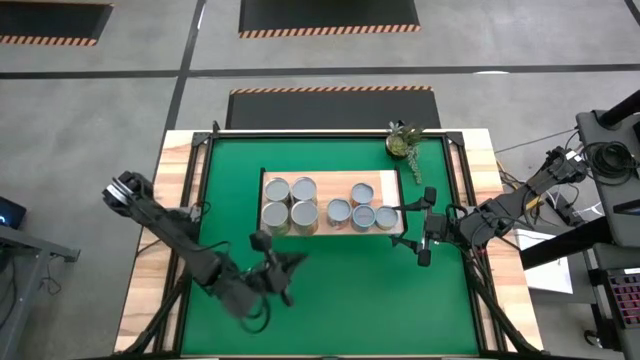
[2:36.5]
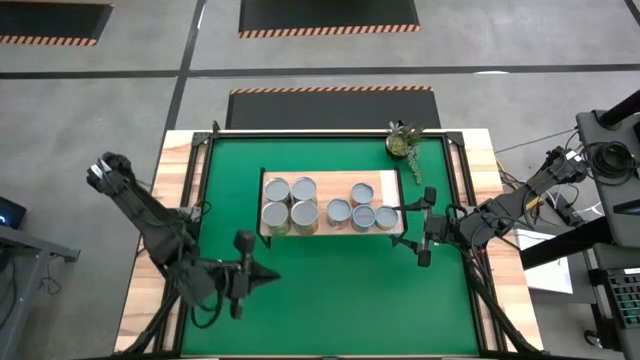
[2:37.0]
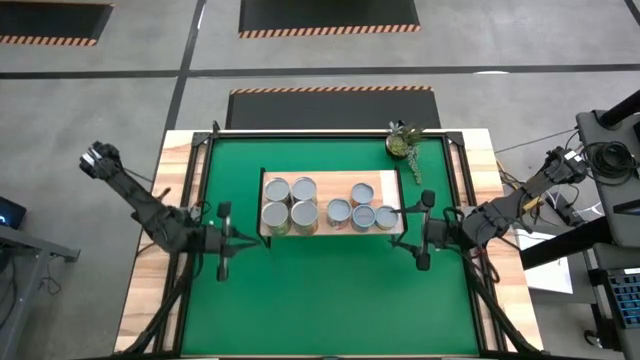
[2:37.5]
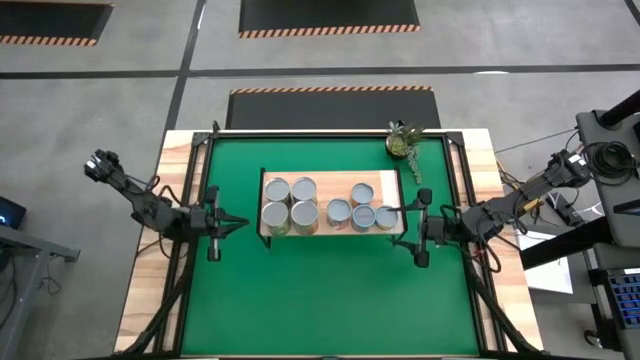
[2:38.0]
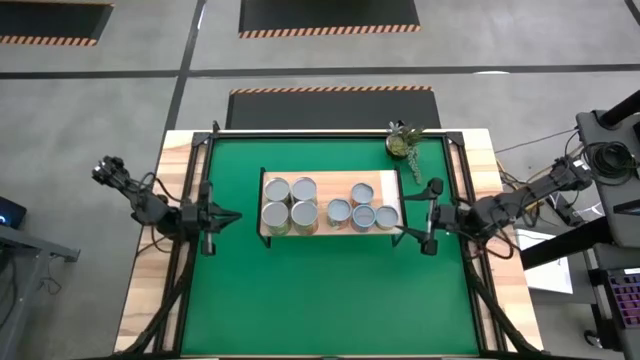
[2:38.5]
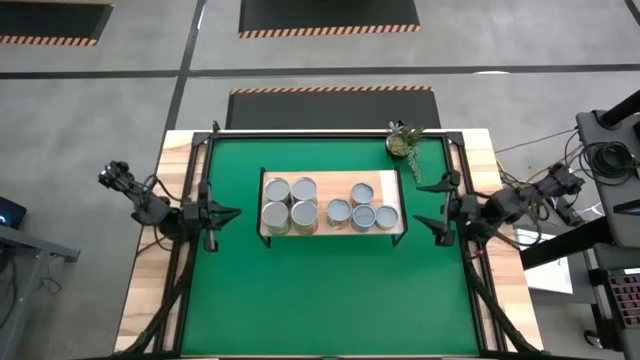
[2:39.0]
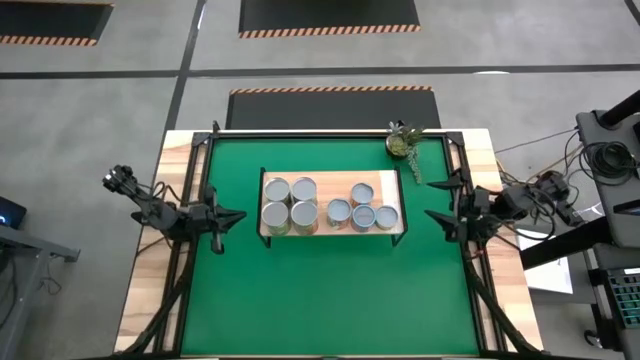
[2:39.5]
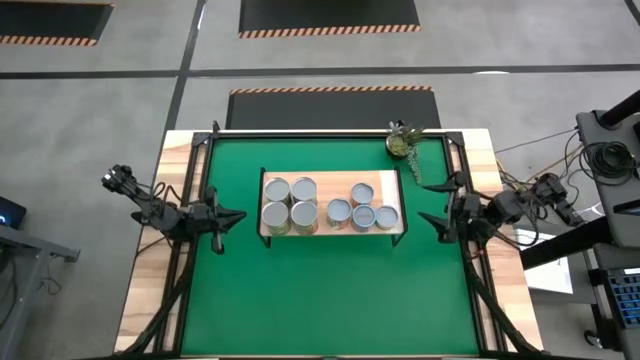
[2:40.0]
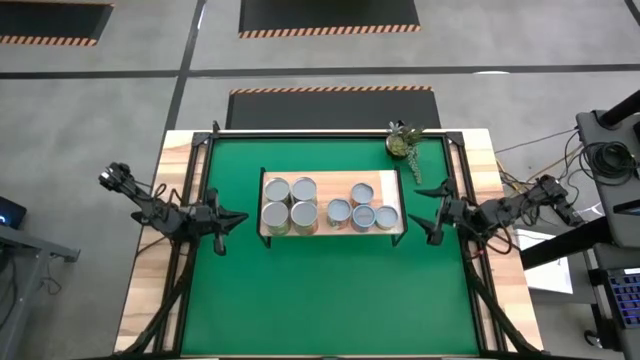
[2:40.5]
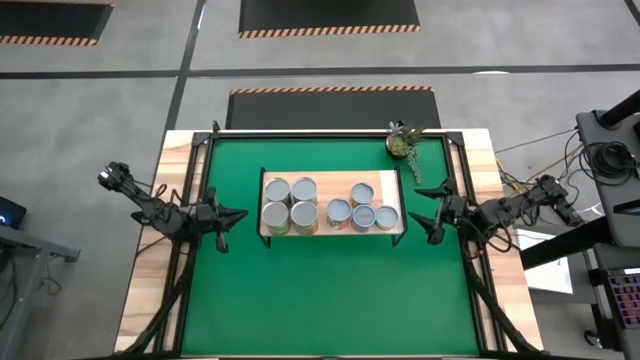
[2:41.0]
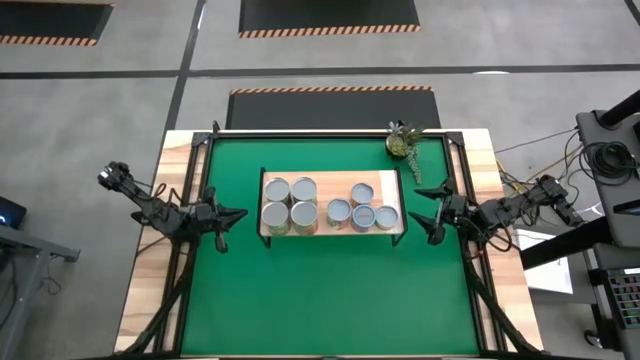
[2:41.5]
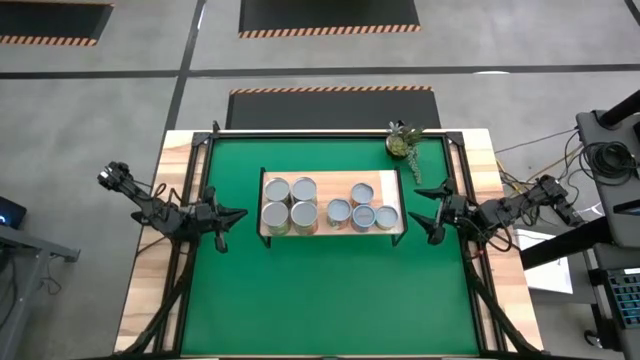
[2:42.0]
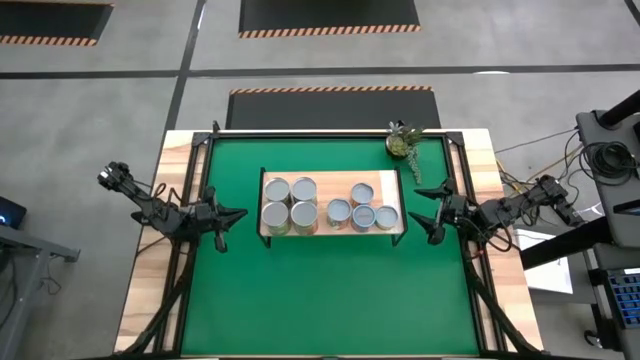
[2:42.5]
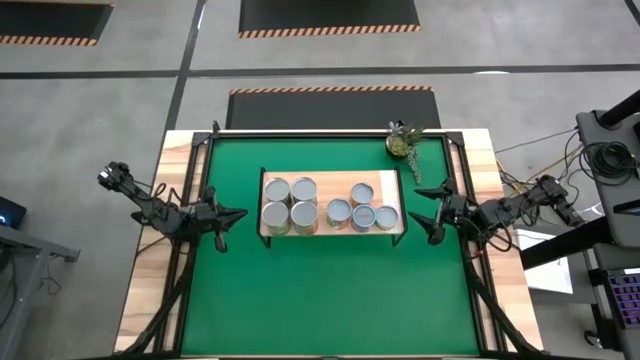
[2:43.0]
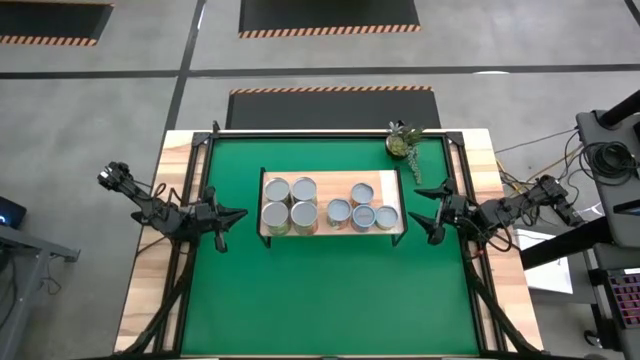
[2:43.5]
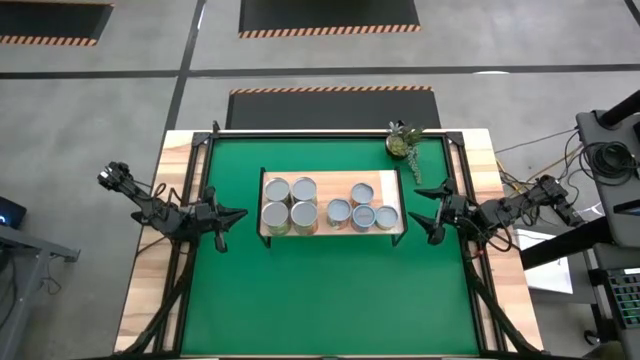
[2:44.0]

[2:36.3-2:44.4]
Task: Pick and place cans onto a shelf
Return to Home Position

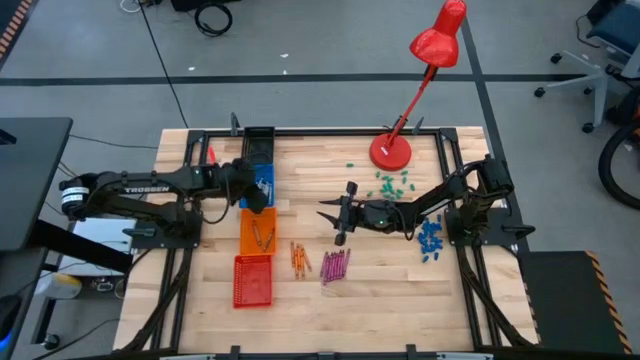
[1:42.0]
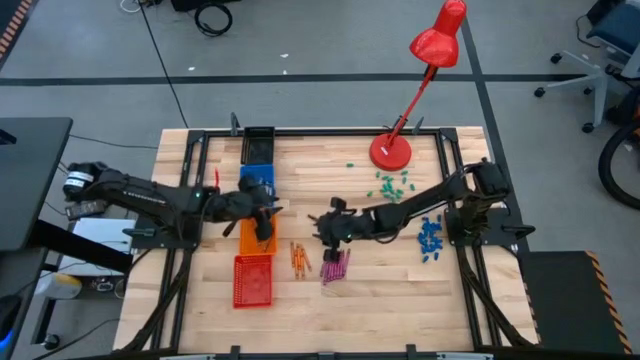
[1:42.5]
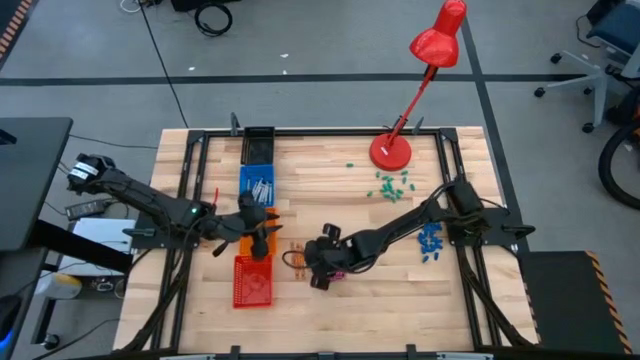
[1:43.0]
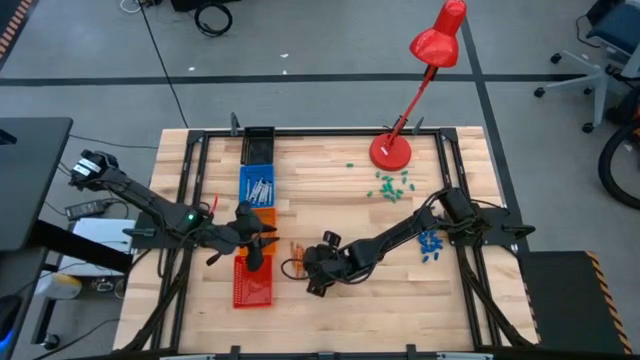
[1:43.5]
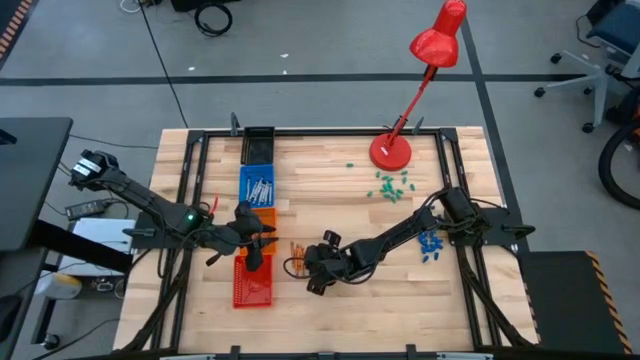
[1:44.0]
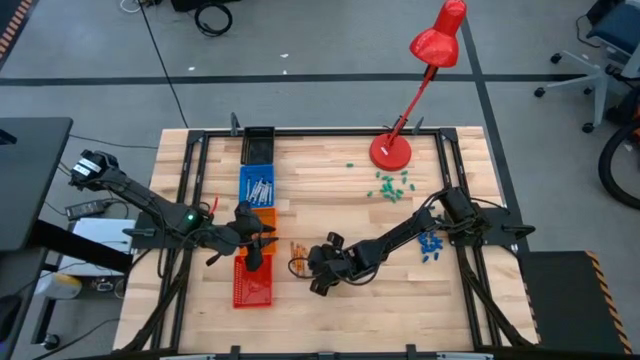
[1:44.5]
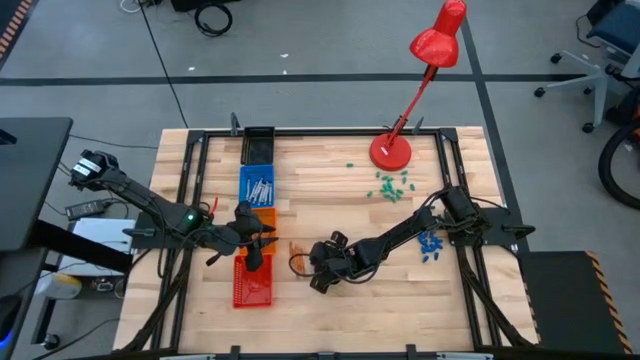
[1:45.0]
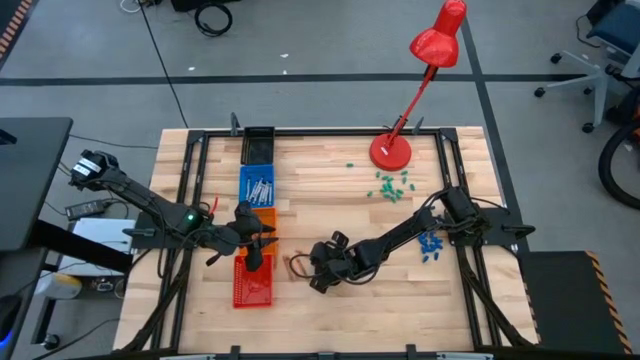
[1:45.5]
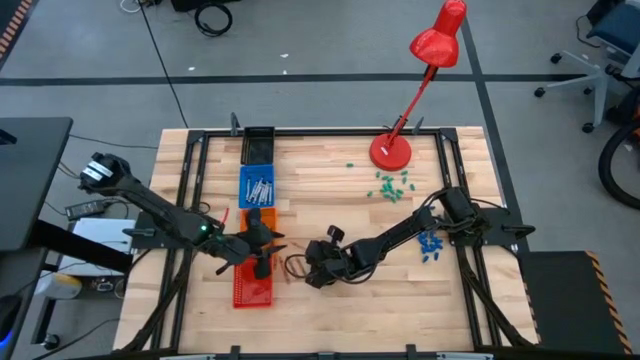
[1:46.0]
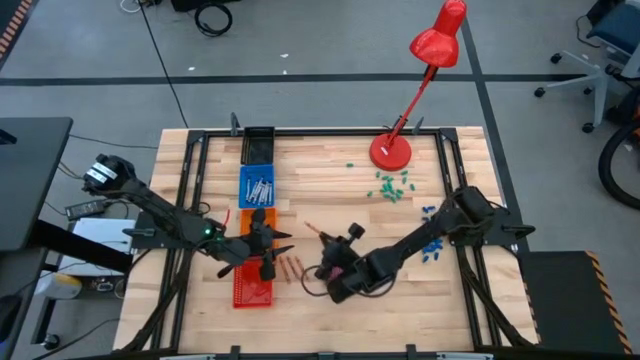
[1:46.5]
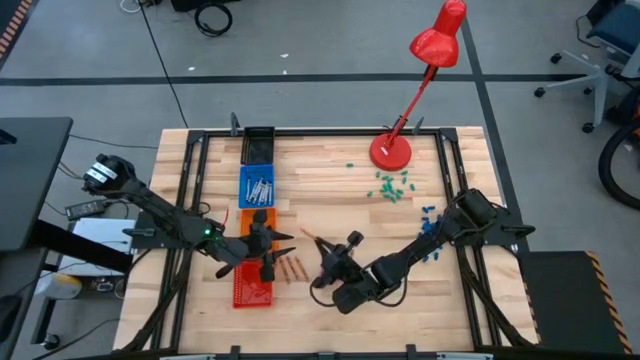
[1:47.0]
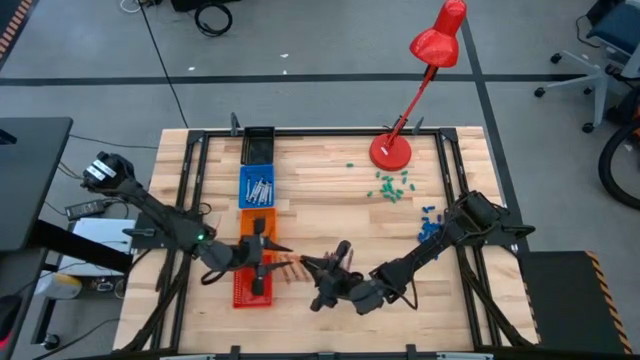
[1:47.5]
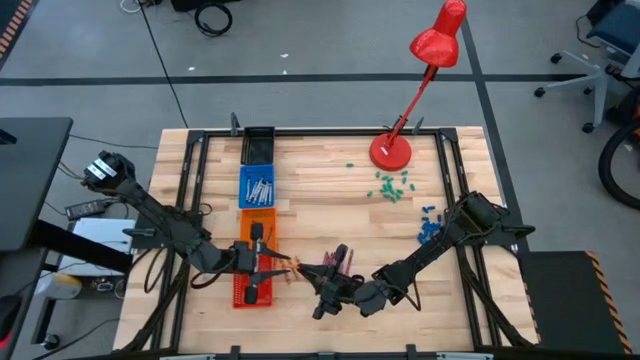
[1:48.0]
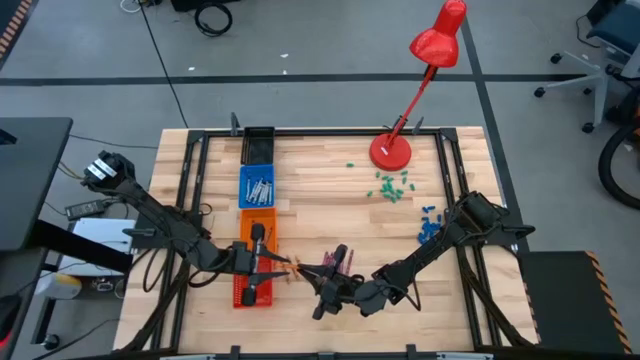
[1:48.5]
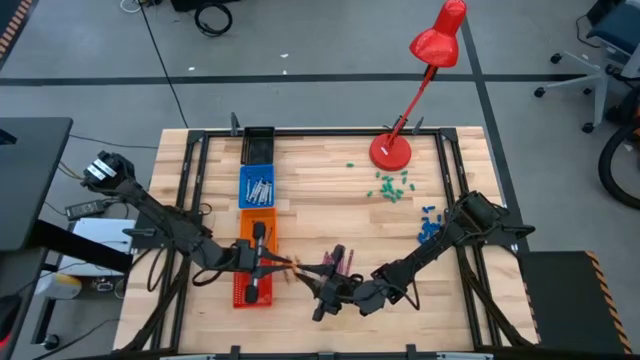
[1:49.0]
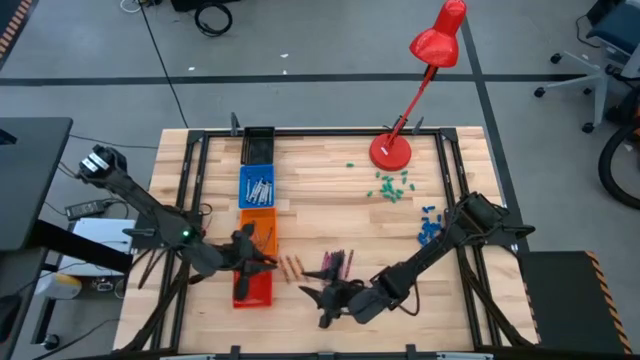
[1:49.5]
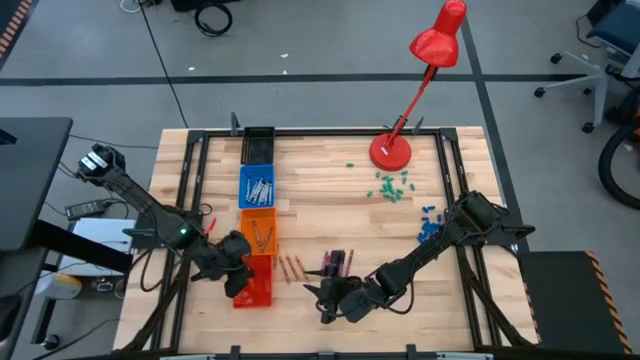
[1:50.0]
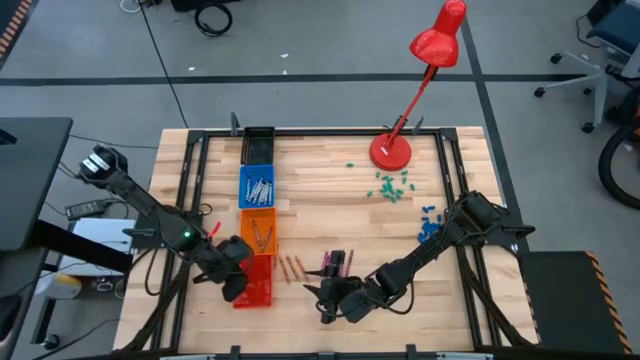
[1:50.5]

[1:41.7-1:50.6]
Task: Sort crayons
Put the orange crayon into the red bin
